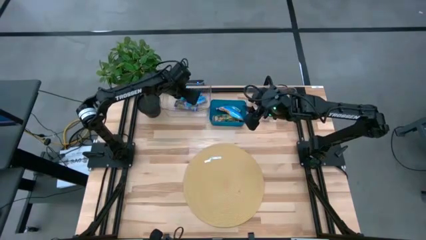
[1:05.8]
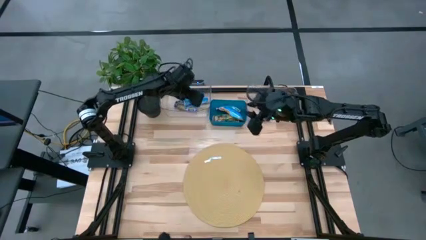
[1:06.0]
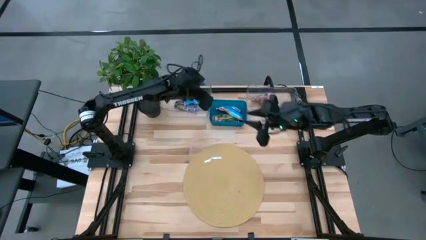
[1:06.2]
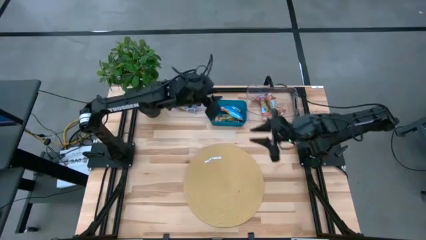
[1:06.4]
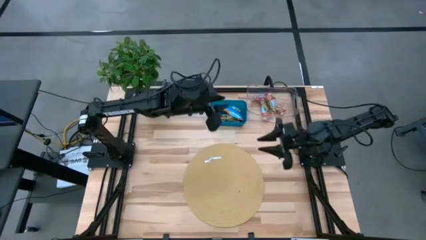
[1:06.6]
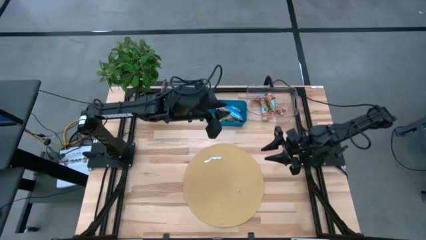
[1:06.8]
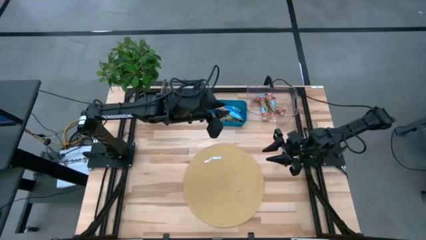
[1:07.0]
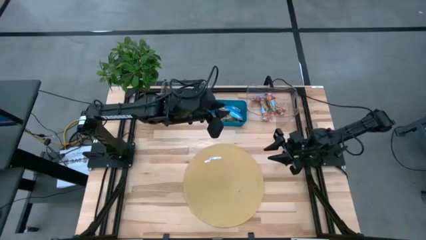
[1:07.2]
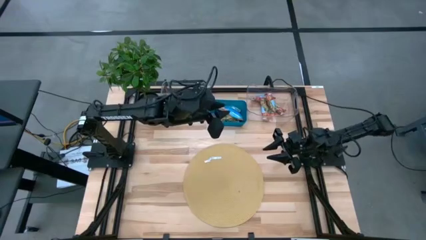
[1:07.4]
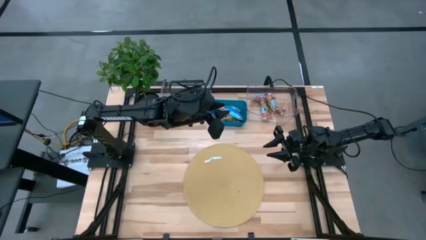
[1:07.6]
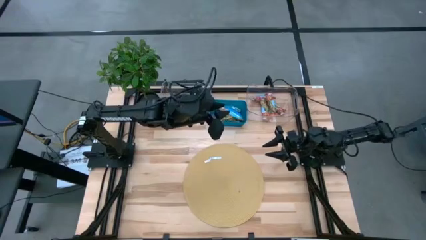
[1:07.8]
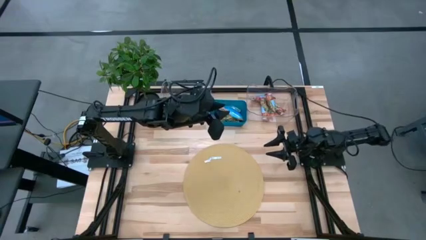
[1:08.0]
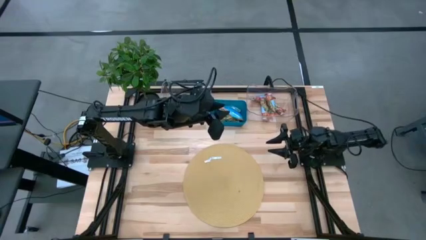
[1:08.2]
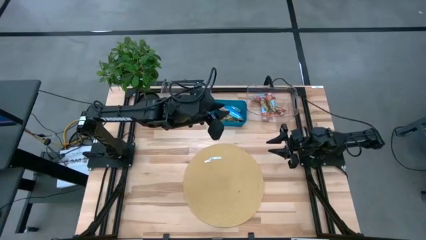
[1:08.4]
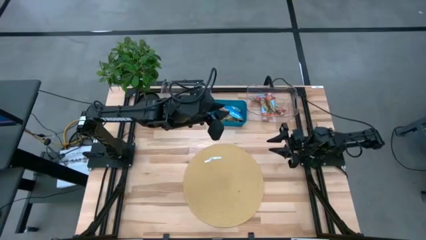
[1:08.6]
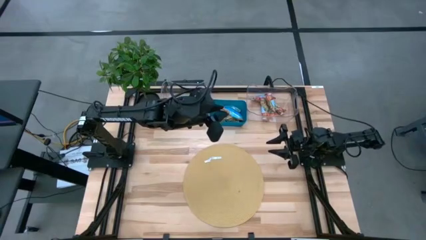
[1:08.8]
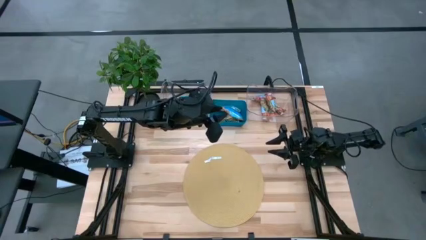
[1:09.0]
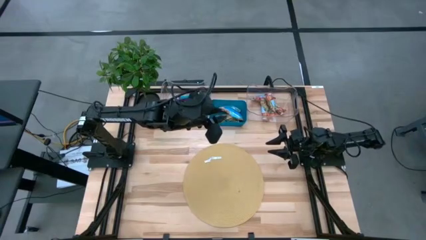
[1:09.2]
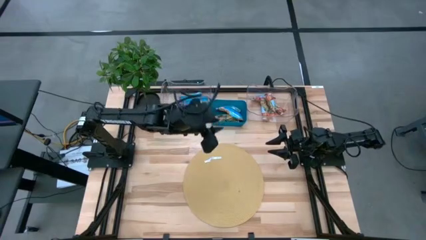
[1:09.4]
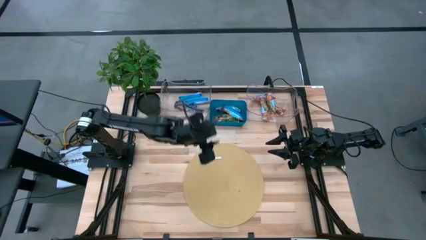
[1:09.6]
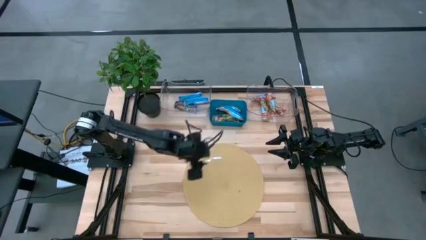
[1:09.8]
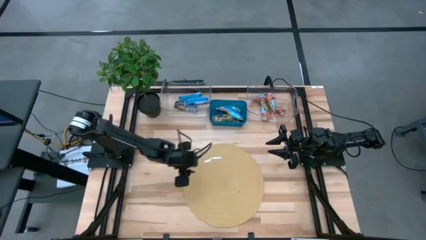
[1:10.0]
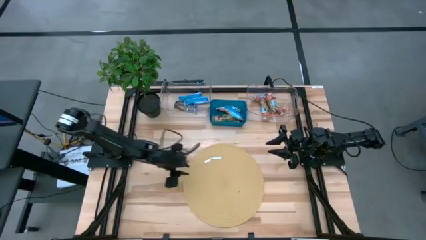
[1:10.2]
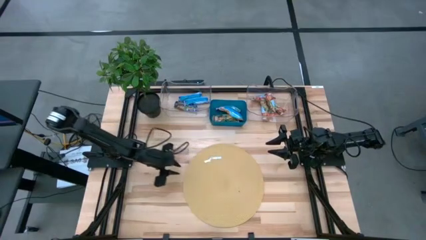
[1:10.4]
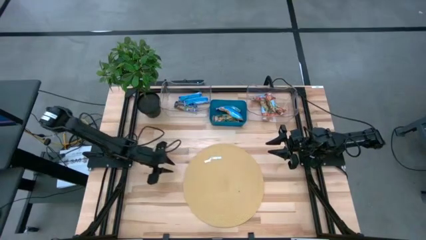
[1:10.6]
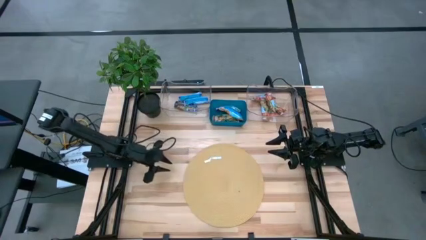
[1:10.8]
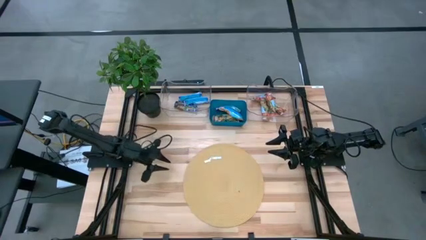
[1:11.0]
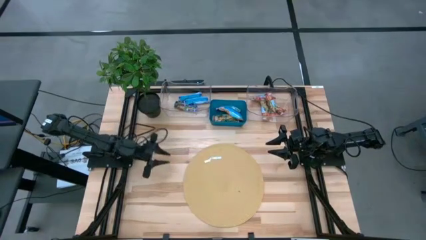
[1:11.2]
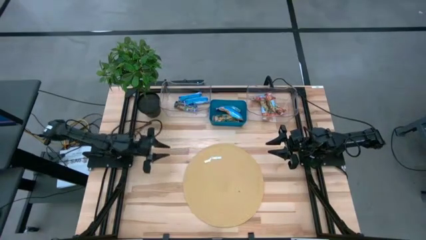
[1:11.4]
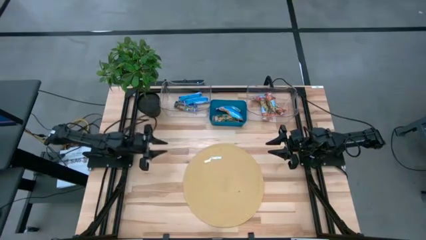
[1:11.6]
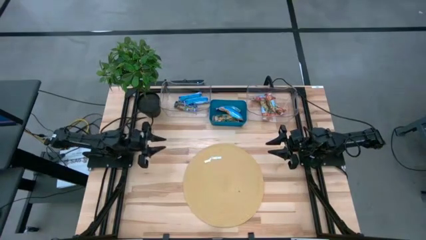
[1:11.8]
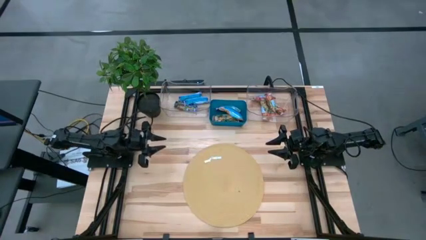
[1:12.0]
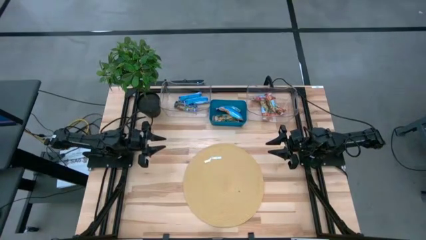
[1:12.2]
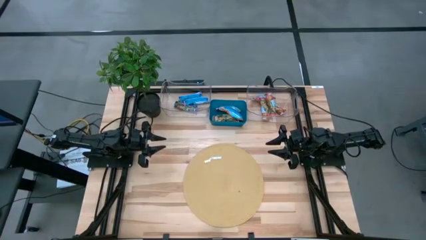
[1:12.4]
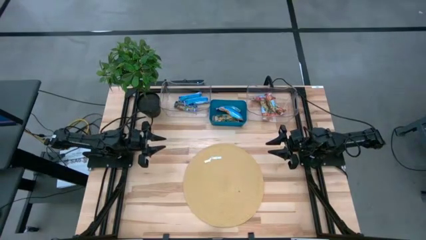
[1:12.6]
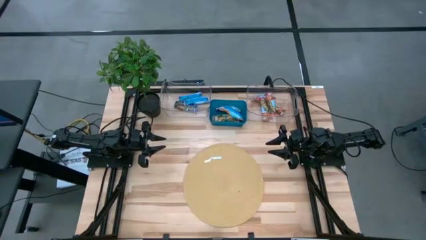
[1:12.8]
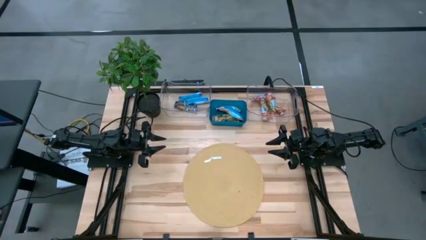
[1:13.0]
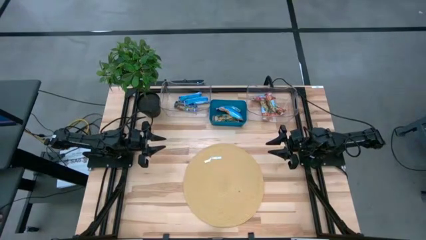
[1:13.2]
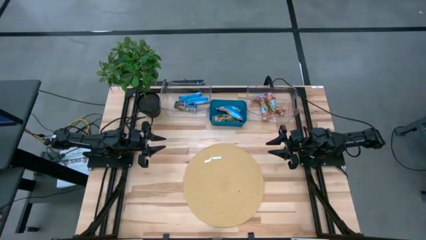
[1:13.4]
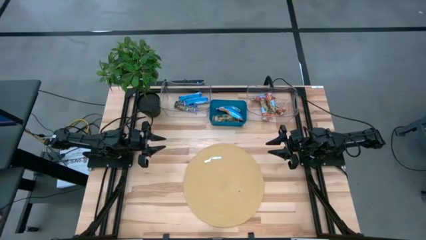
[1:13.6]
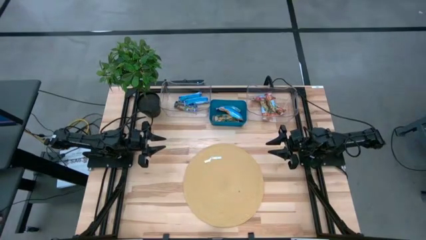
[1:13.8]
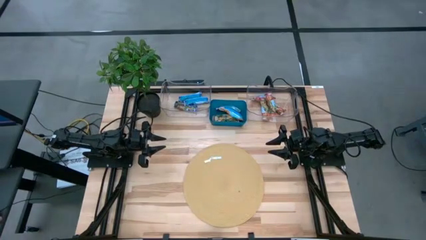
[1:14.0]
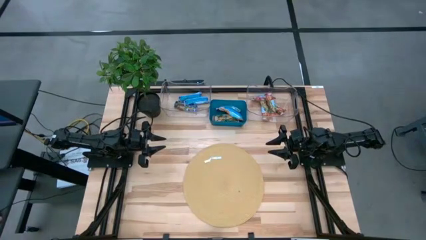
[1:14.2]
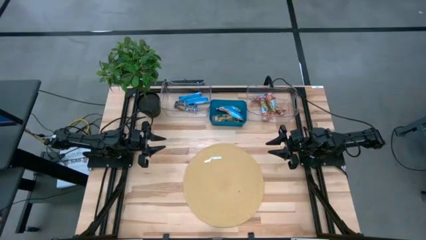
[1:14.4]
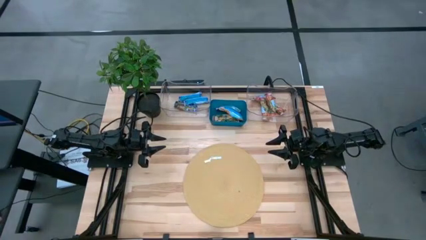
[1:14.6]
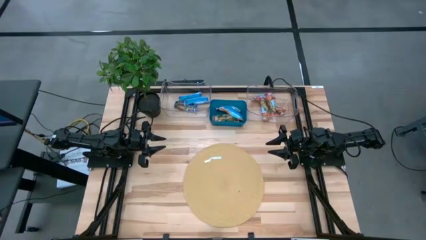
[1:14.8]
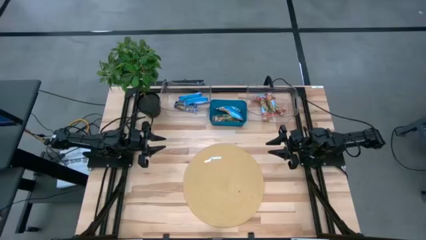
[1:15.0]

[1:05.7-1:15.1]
Task: Pick and place Granola Bars by type
Return to Home Position

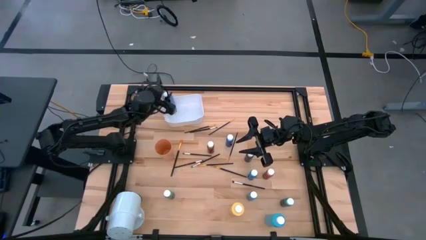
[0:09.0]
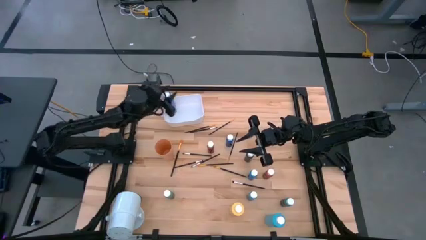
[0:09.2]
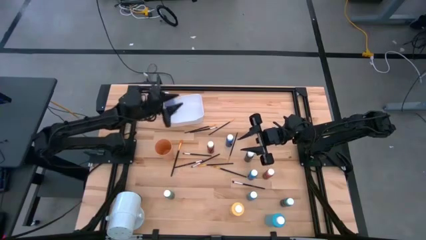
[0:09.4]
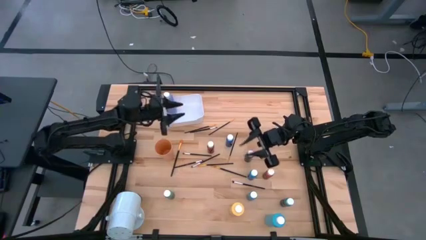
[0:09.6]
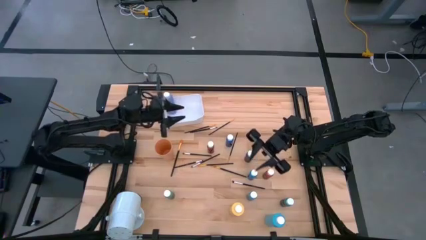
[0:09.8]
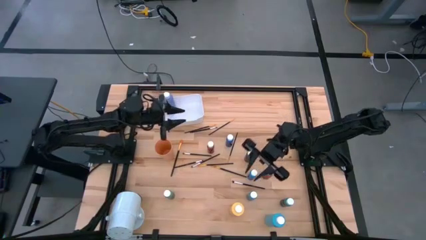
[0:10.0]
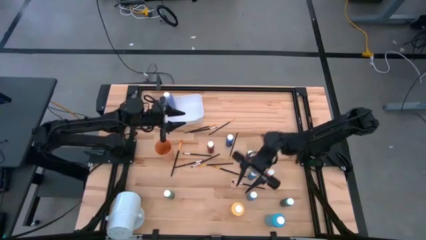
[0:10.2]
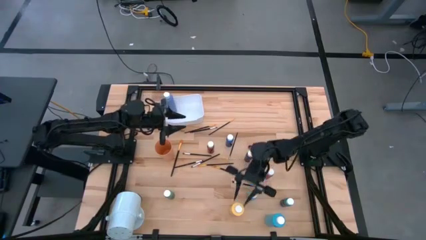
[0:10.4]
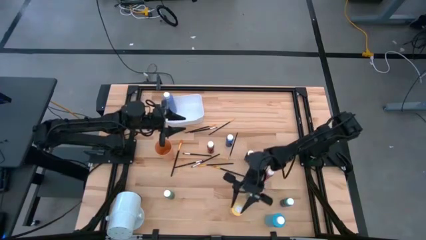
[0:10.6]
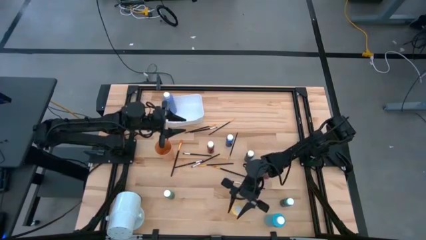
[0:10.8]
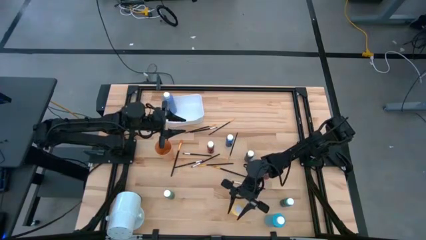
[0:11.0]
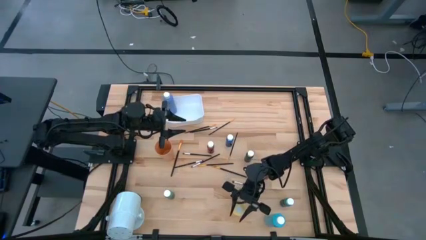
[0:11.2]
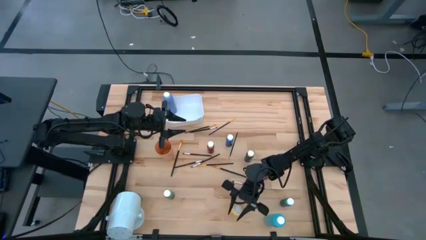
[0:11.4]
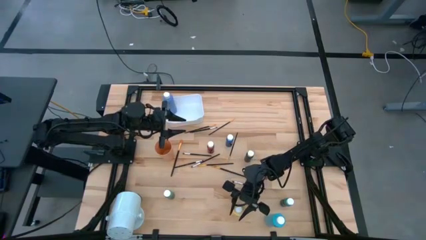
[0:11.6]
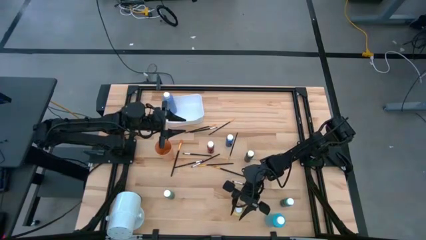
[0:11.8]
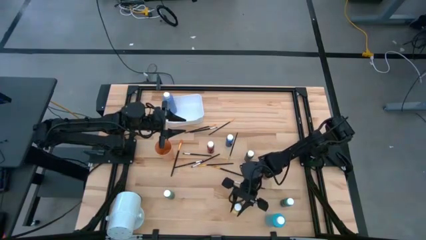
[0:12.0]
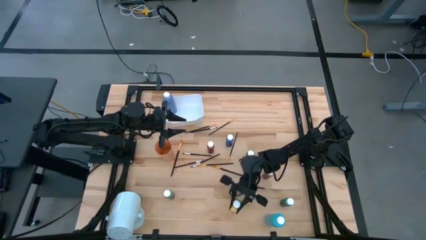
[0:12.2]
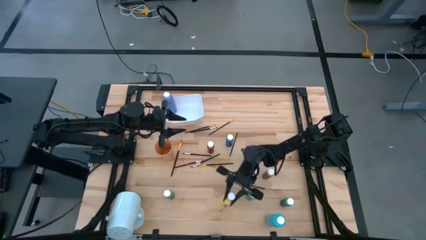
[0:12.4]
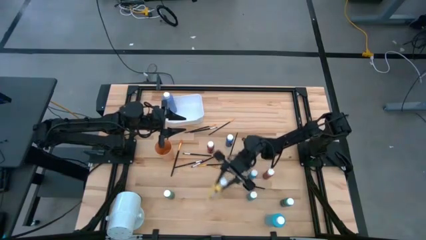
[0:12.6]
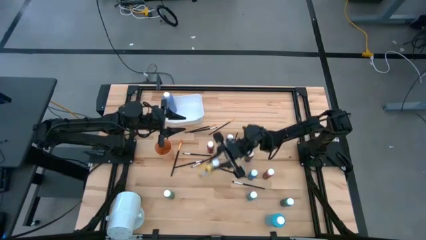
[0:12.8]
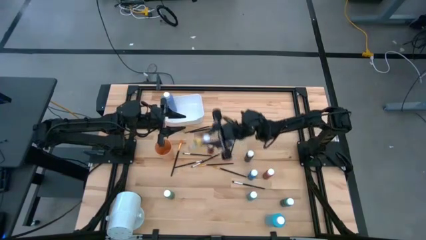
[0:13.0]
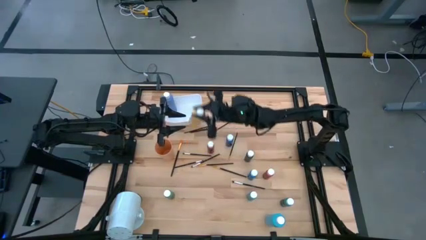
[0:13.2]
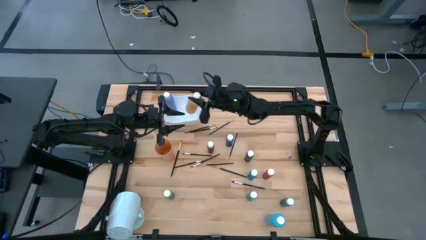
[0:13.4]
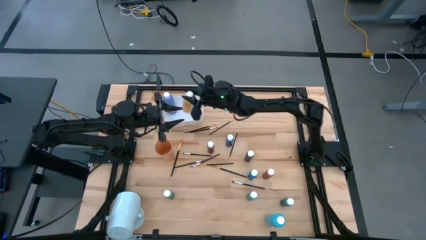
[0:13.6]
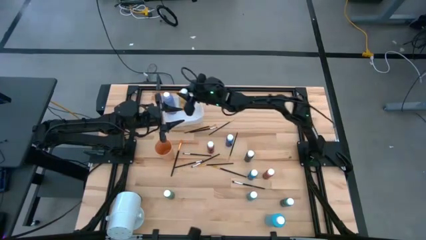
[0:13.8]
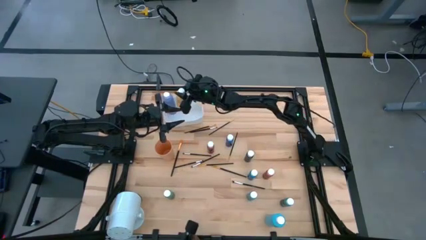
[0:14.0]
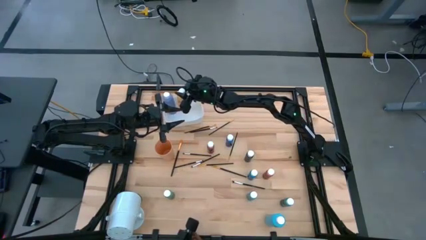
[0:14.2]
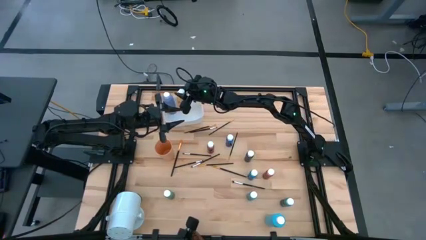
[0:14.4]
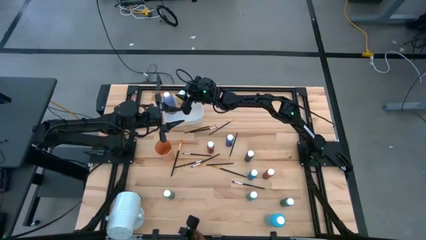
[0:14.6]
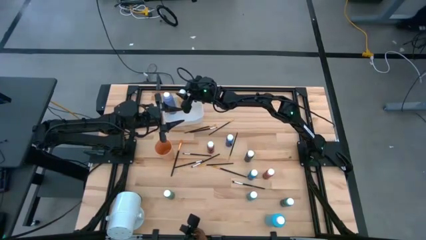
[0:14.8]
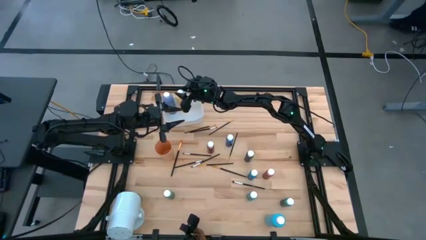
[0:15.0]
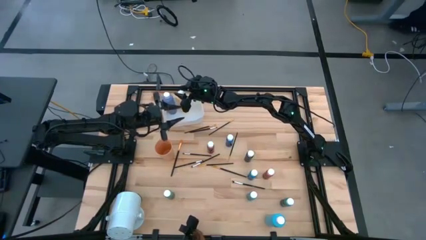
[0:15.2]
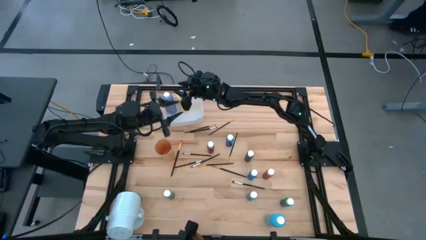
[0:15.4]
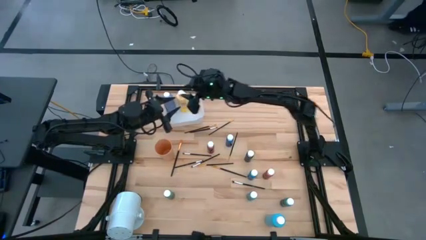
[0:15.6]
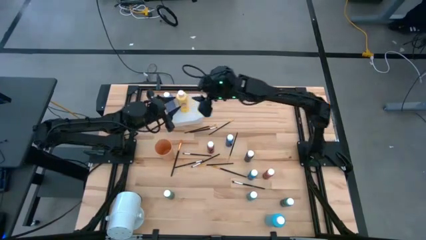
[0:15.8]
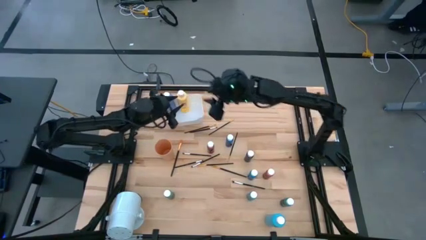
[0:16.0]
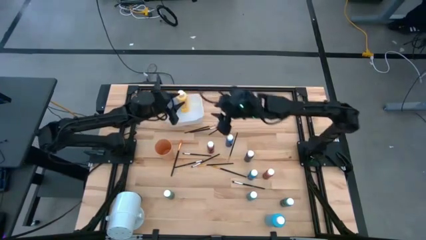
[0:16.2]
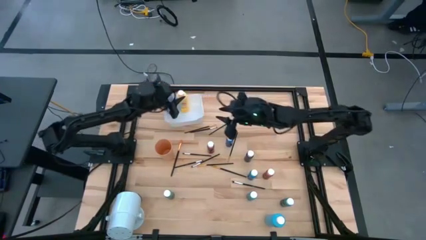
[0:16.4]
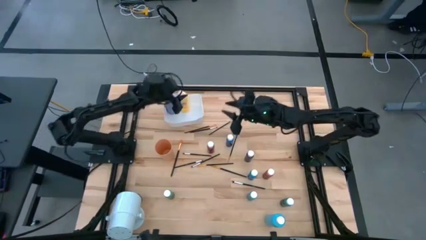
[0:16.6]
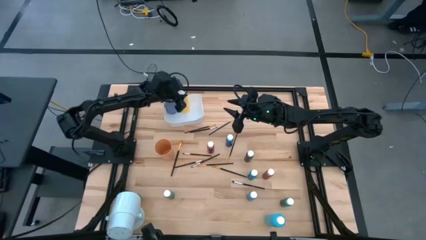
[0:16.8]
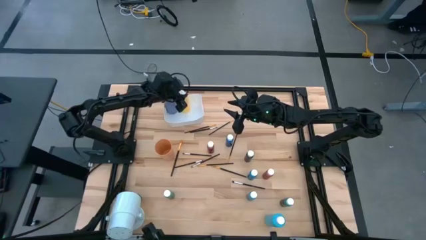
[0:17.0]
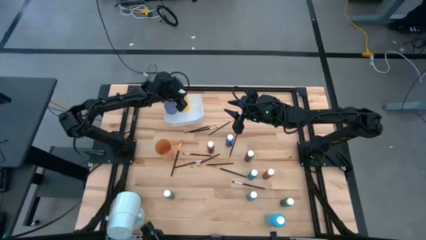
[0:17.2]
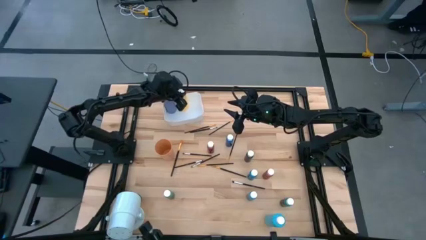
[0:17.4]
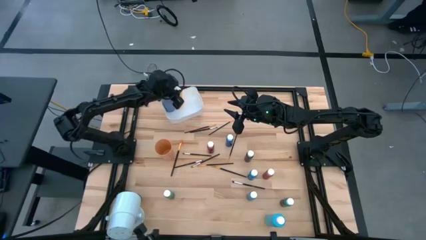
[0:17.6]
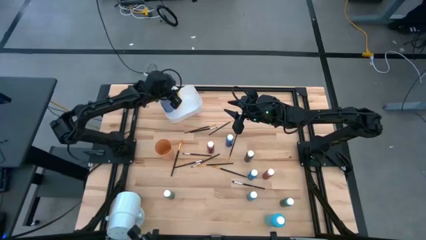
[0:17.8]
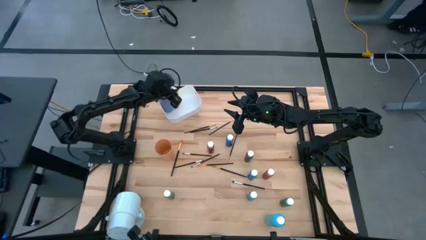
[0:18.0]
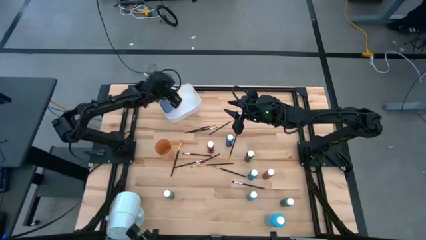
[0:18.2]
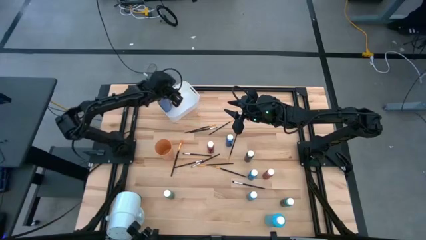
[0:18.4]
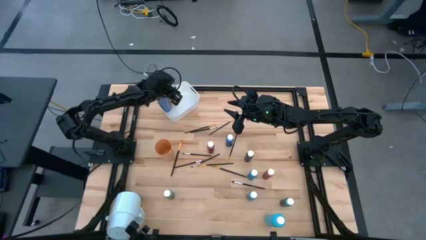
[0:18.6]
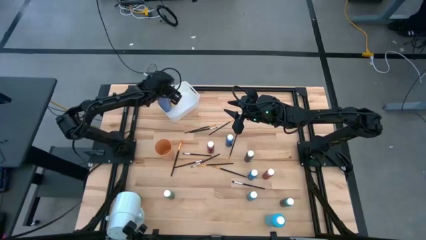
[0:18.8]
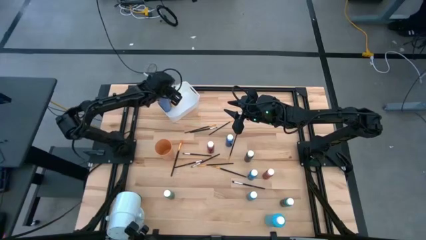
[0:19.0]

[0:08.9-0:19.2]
Task: Pick & Place Paint Supplies
Put the yellow paint bottle into the white bin
